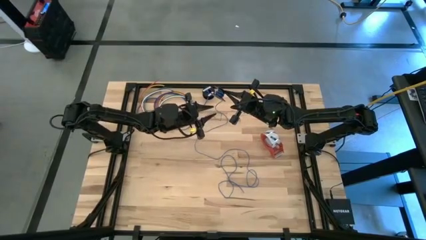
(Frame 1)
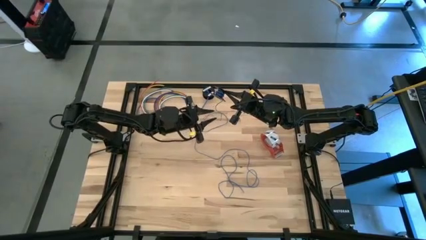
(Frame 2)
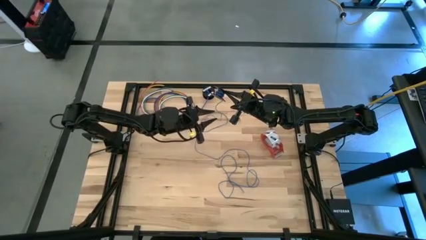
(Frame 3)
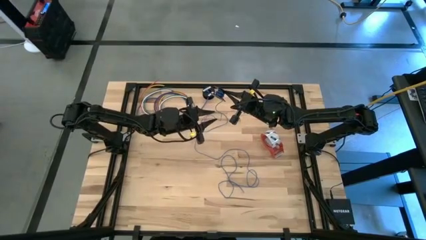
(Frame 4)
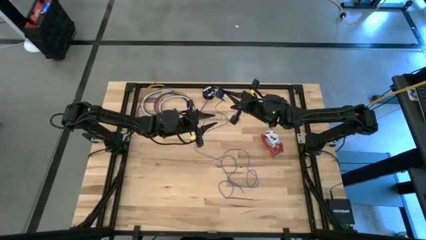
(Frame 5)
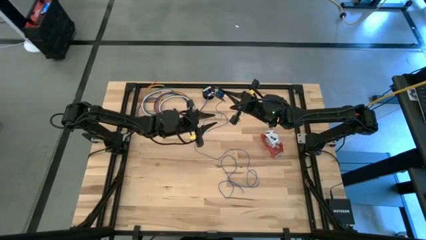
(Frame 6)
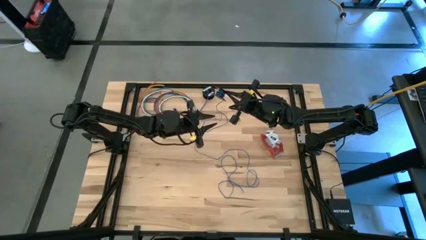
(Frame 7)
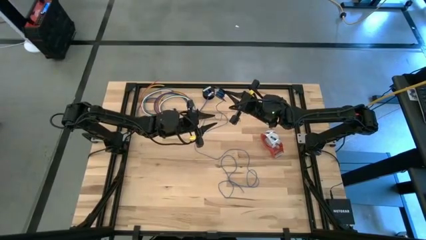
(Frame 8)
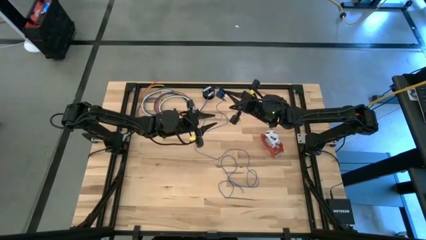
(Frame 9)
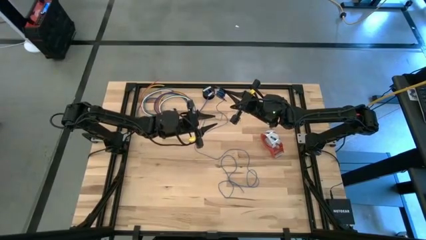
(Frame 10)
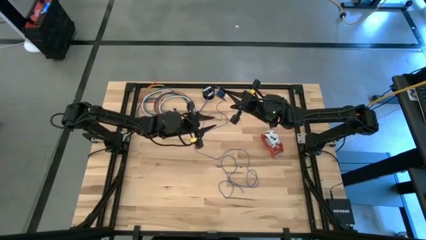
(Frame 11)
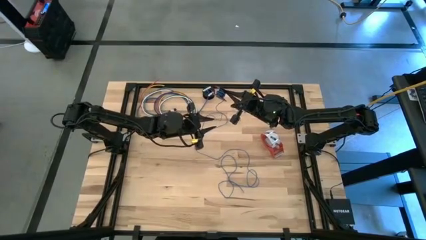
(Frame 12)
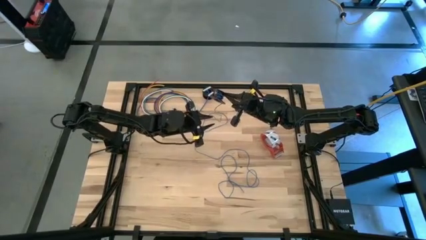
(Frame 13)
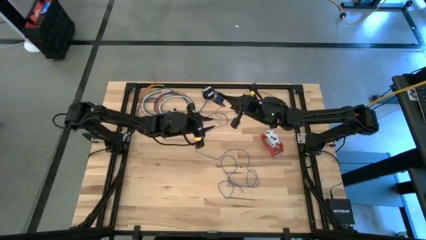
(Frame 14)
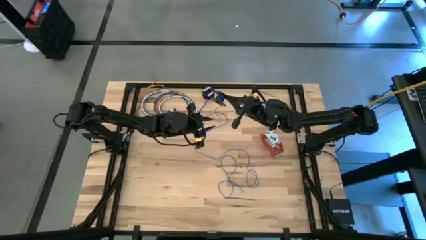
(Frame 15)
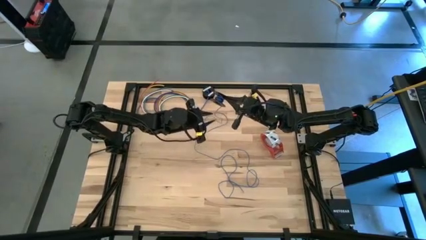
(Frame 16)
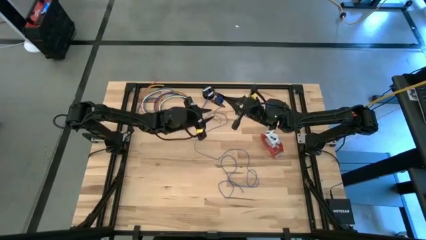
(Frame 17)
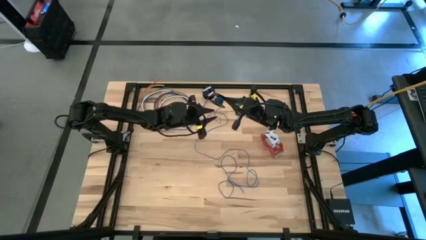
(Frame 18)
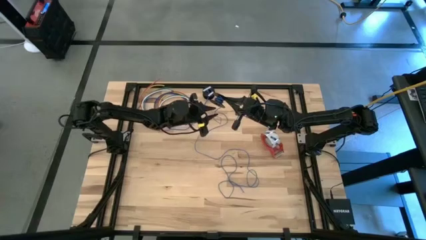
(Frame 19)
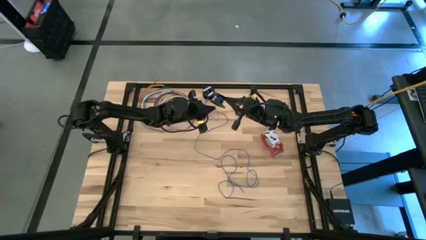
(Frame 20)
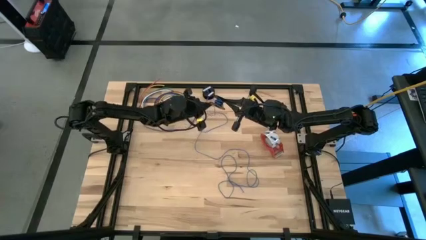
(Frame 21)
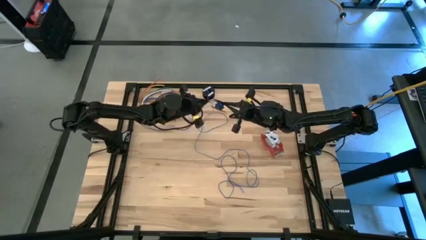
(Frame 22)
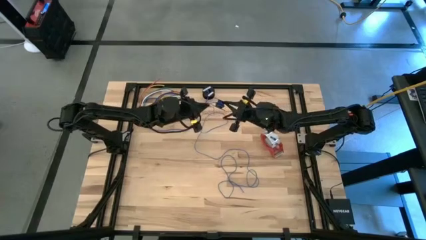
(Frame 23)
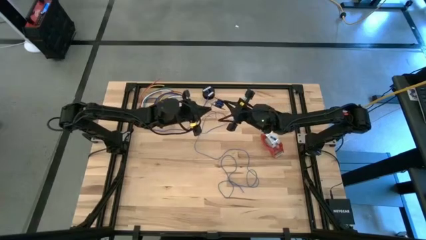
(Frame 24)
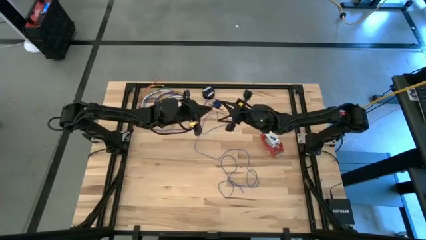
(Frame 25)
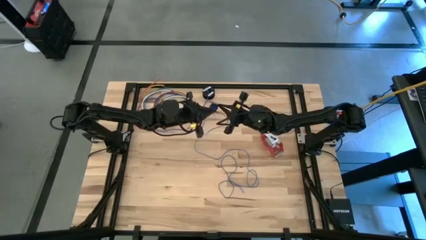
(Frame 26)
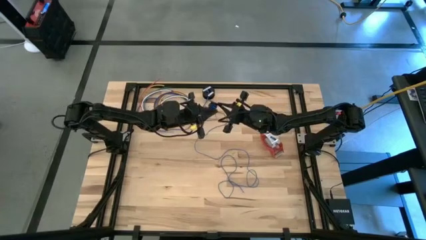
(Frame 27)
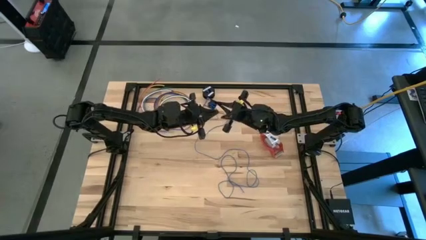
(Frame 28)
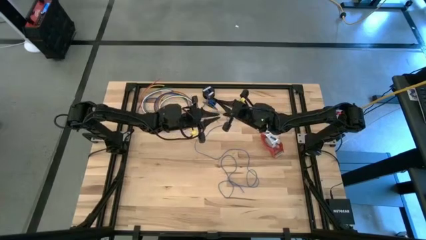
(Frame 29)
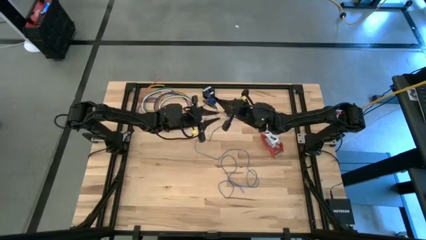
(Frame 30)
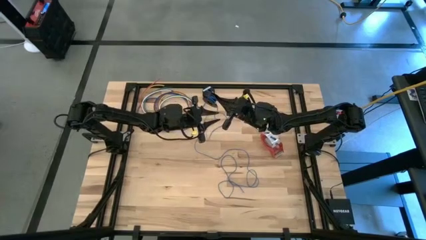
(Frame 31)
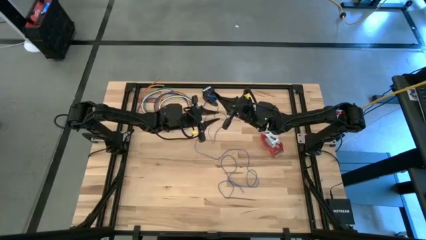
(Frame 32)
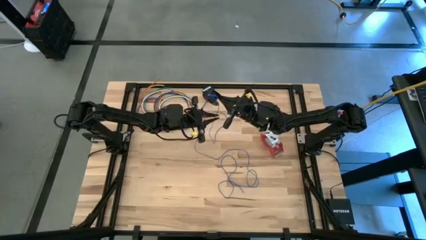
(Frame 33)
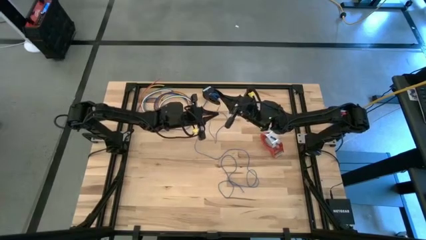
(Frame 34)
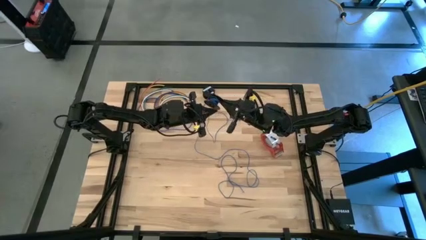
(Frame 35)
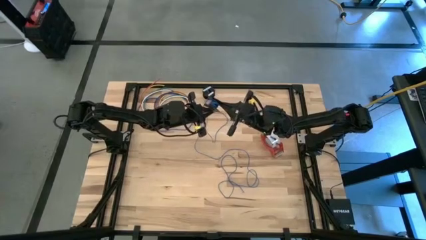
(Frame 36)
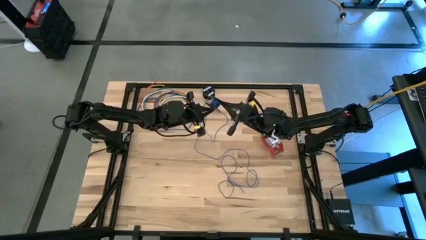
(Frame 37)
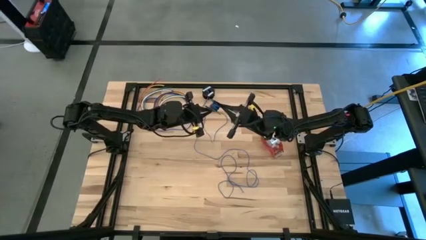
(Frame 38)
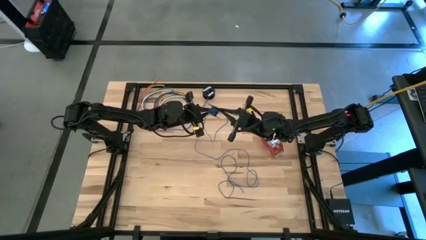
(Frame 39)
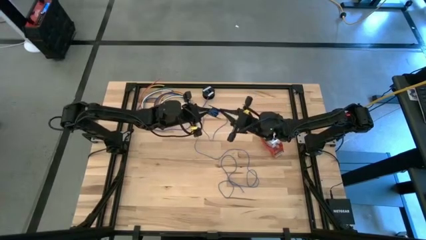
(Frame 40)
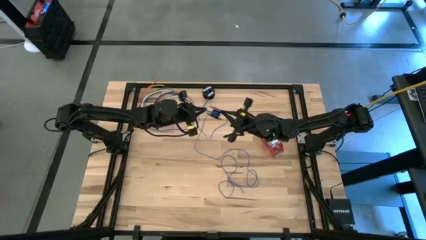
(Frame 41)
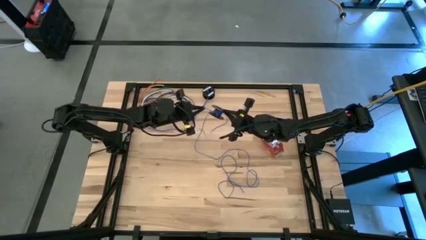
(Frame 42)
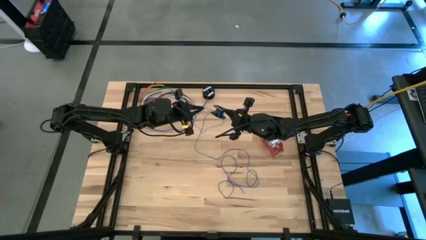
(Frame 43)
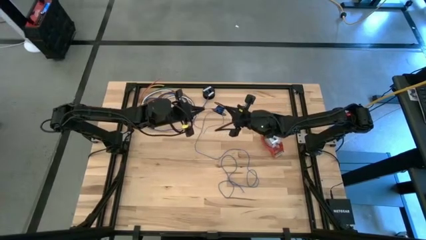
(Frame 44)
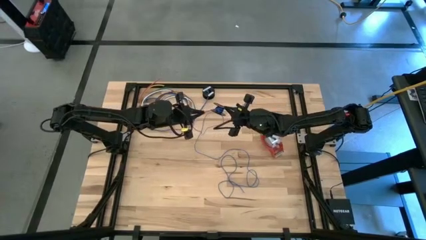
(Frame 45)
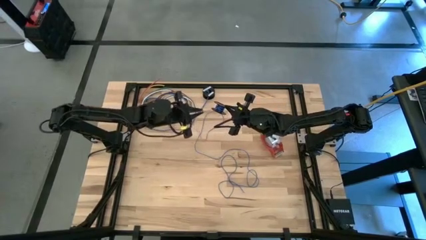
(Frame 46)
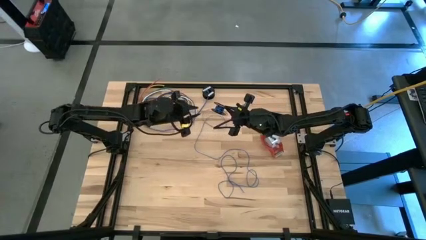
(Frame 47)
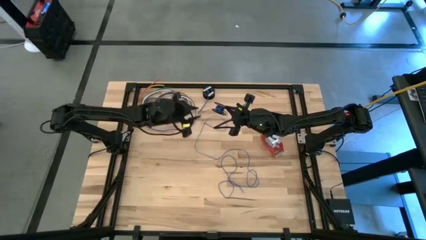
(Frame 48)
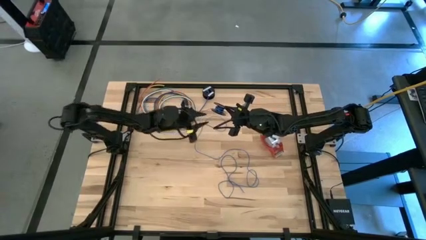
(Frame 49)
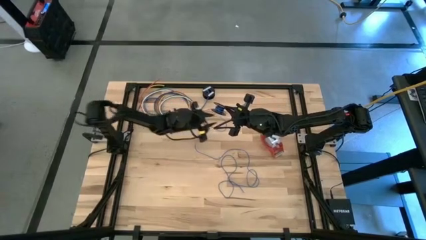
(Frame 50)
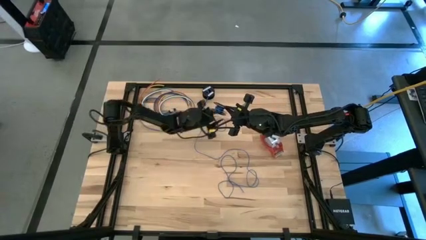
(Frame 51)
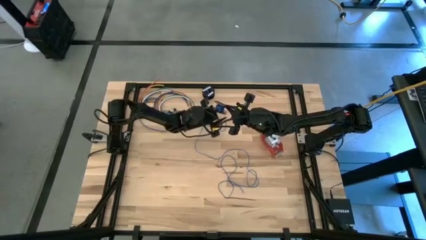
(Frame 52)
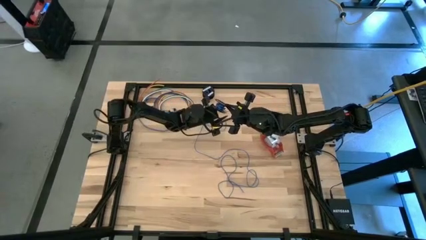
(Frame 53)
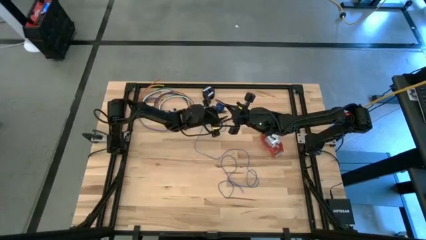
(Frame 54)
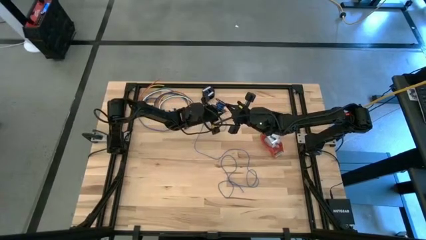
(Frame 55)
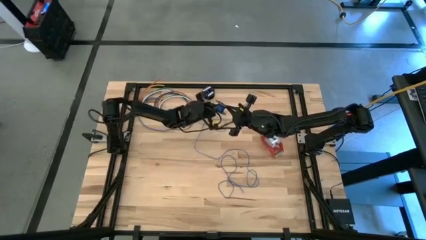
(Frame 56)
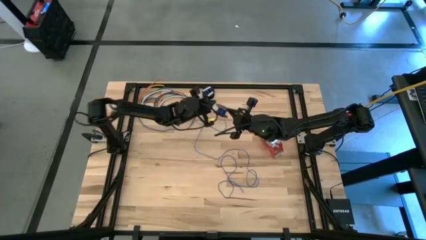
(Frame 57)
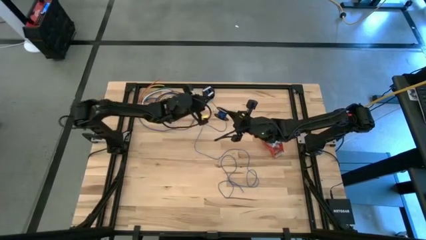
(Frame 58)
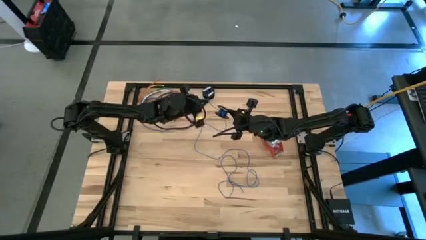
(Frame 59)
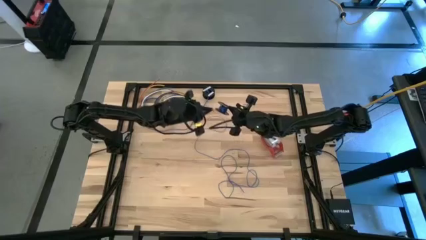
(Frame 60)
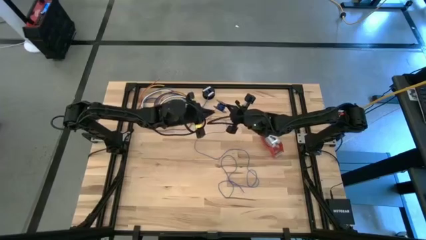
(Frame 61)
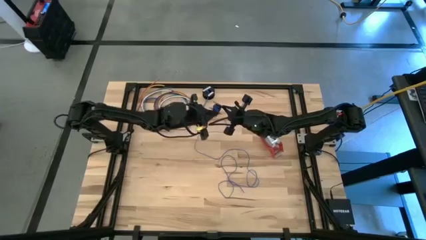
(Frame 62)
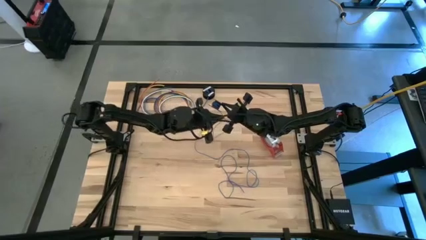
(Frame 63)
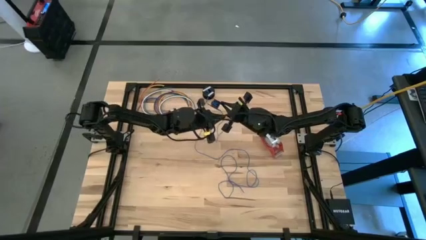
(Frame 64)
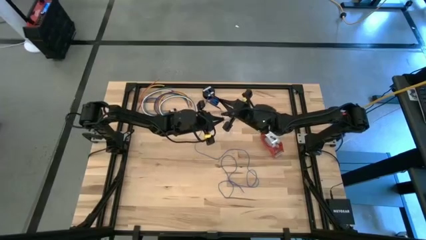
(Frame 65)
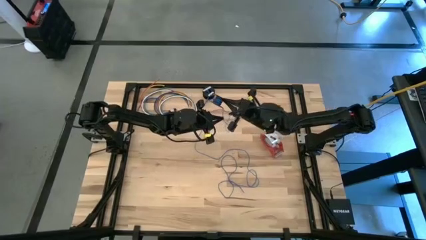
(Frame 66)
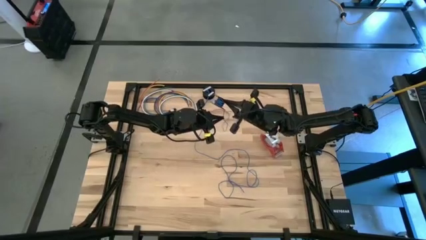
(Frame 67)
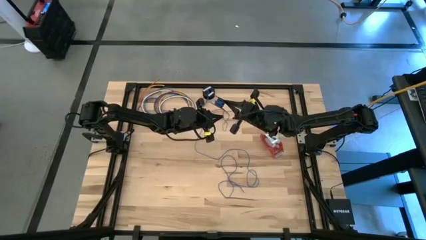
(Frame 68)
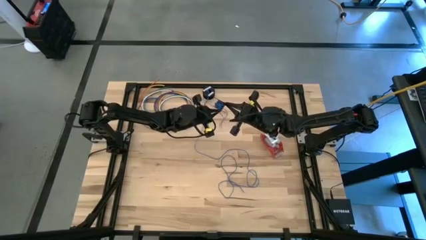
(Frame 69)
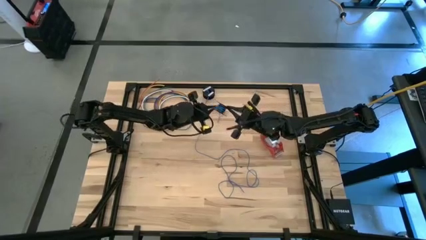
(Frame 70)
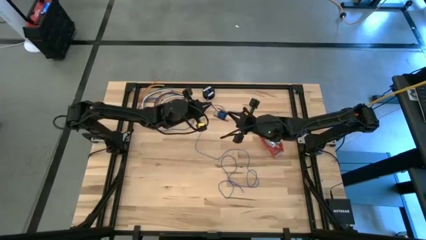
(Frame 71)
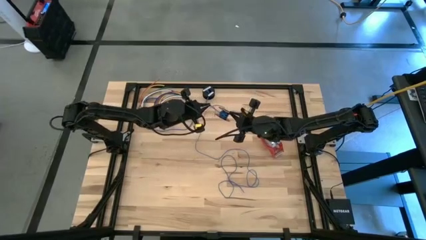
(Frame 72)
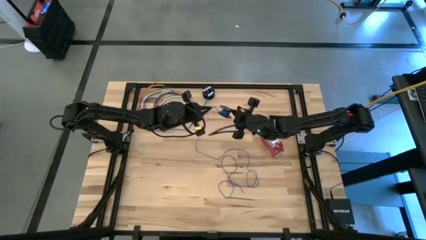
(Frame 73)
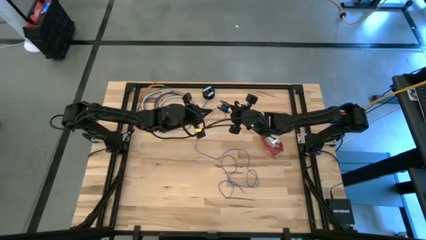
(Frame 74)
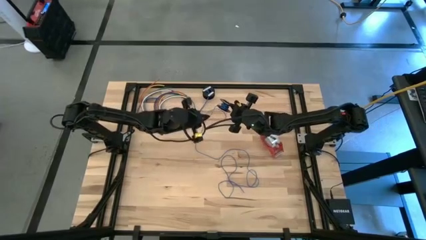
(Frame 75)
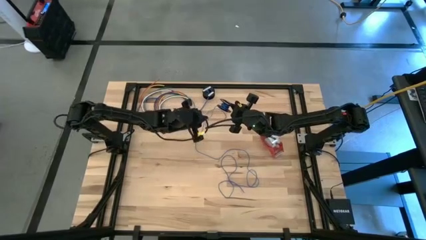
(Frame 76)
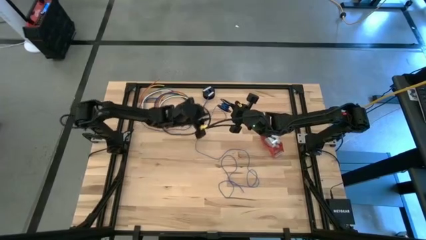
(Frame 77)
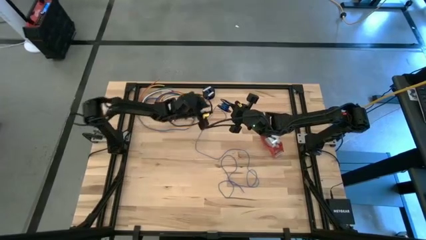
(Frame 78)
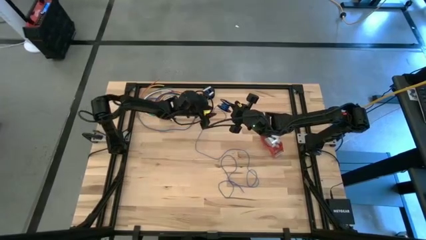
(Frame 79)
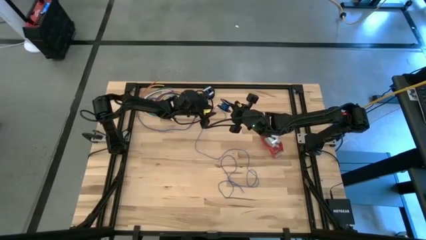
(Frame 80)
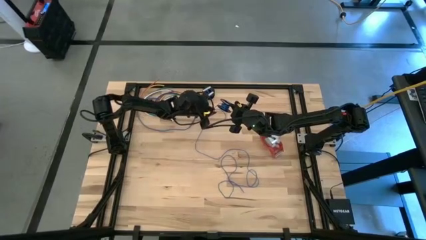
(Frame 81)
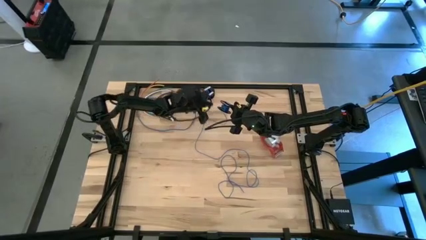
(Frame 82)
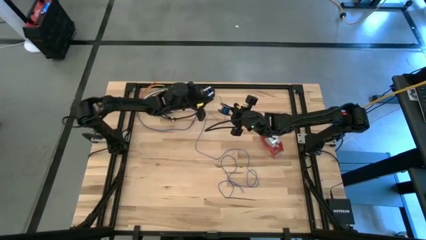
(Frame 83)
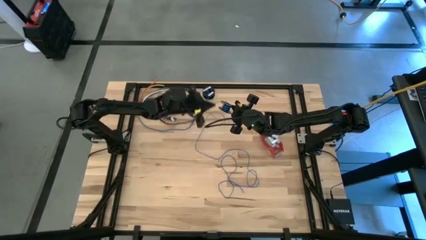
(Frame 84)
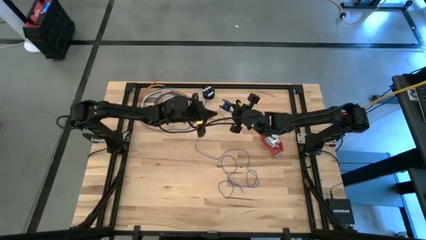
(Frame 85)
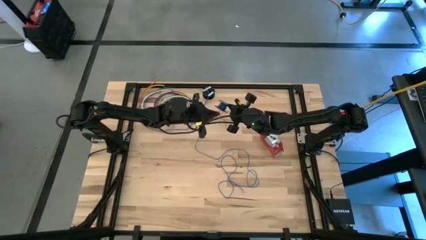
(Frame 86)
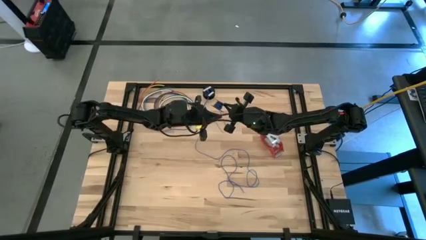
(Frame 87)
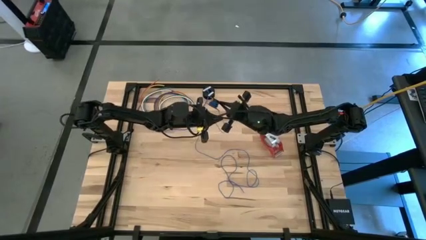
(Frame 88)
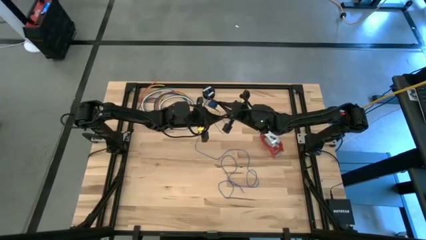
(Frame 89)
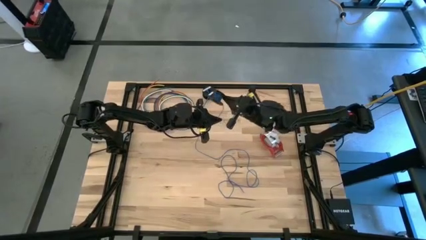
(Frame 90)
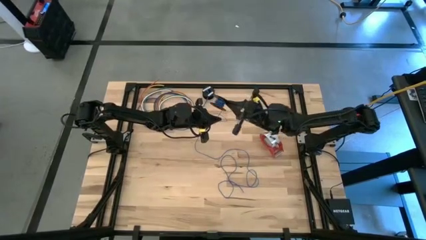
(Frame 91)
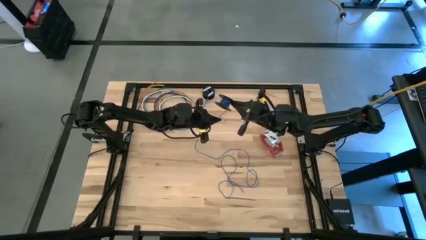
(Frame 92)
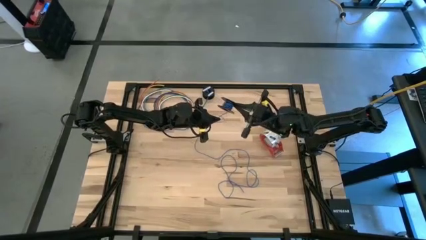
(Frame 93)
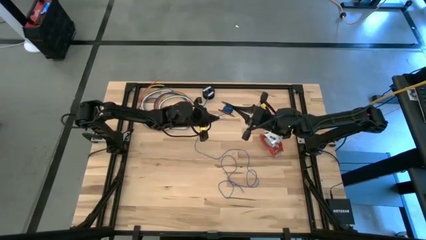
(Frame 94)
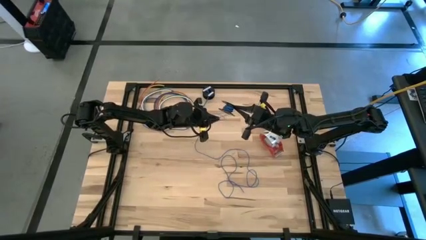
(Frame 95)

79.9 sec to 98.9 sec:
Task: Coil cords
Coil the blue wire onto the spool
